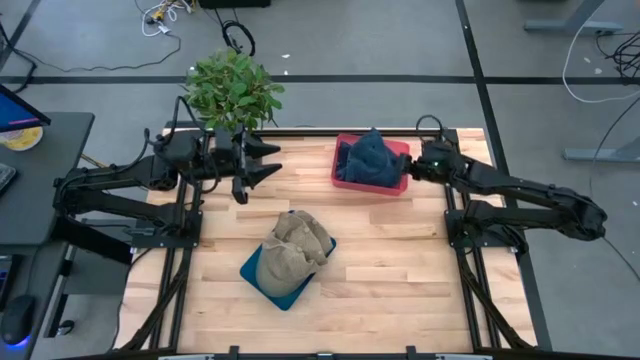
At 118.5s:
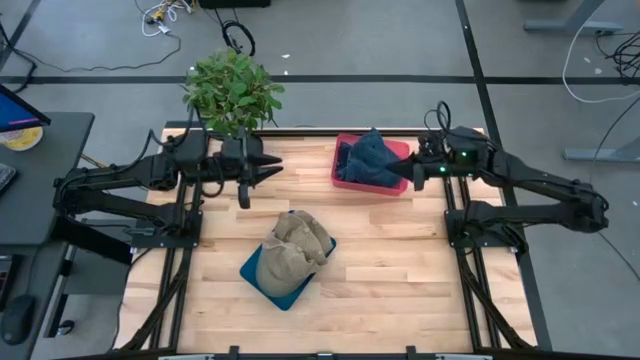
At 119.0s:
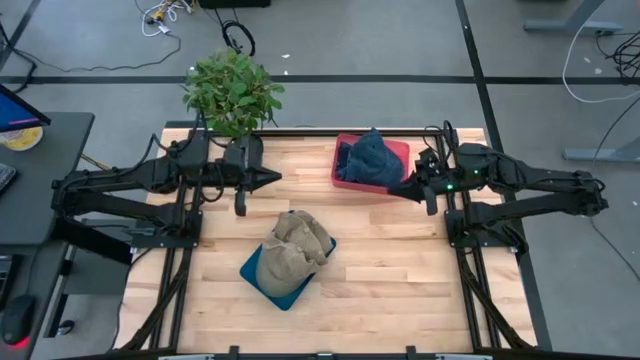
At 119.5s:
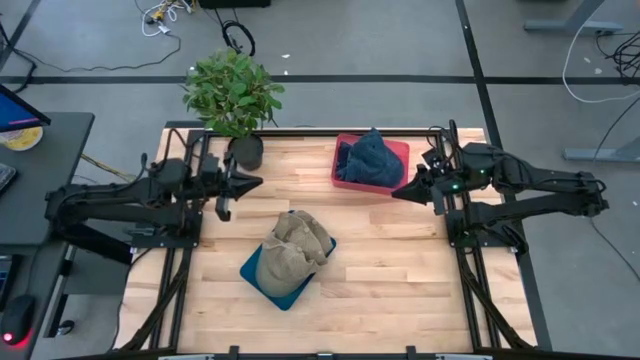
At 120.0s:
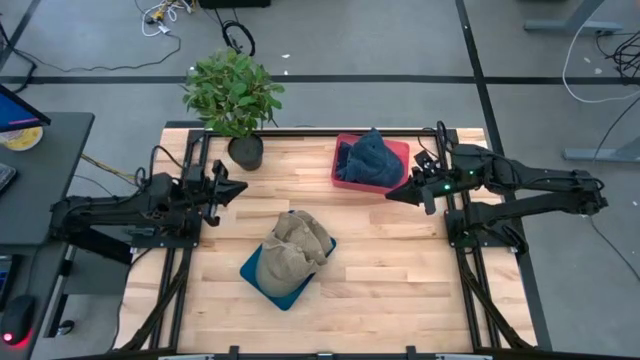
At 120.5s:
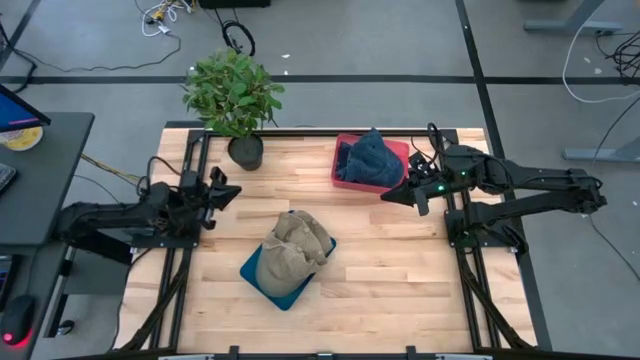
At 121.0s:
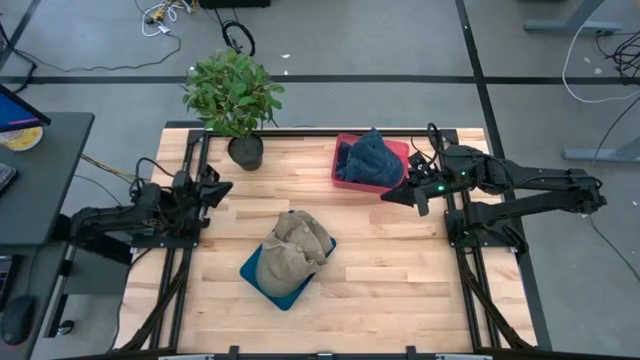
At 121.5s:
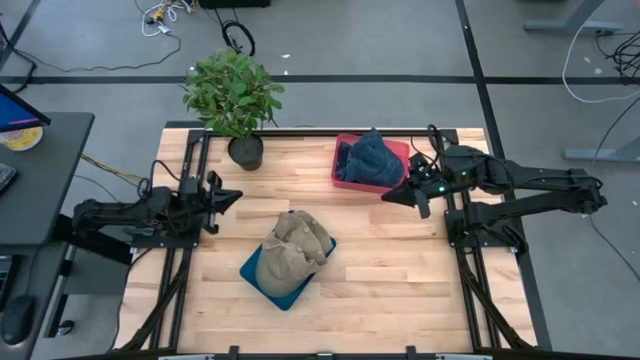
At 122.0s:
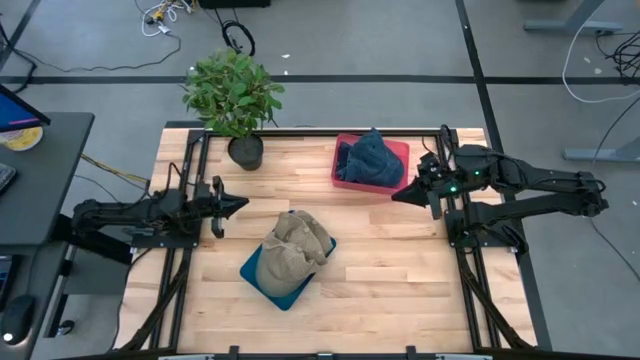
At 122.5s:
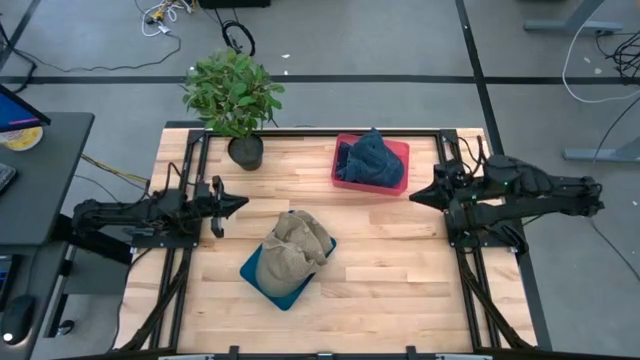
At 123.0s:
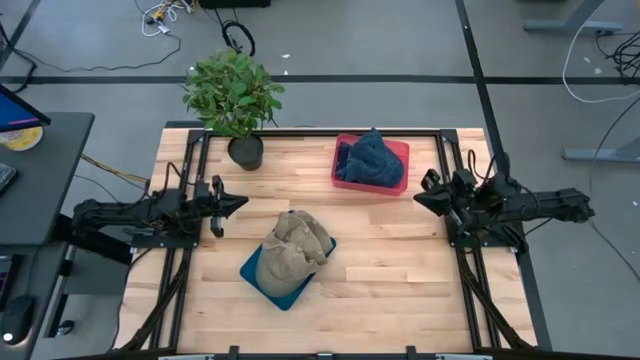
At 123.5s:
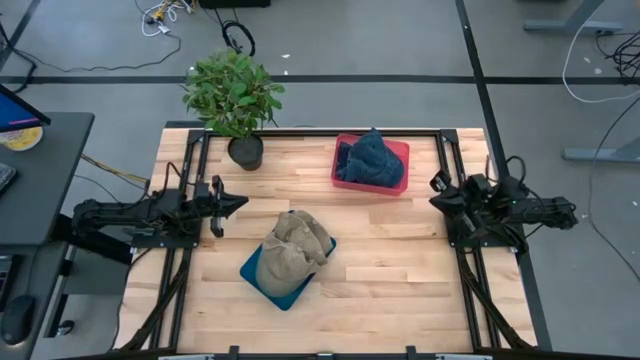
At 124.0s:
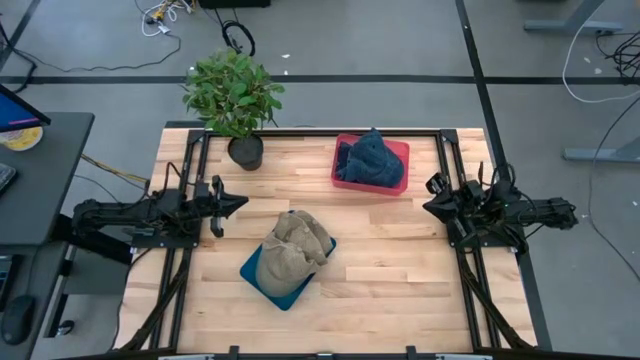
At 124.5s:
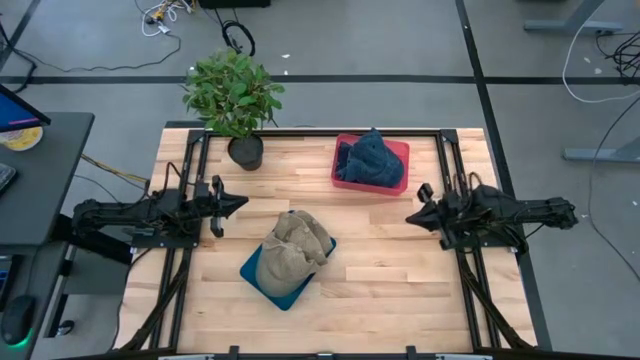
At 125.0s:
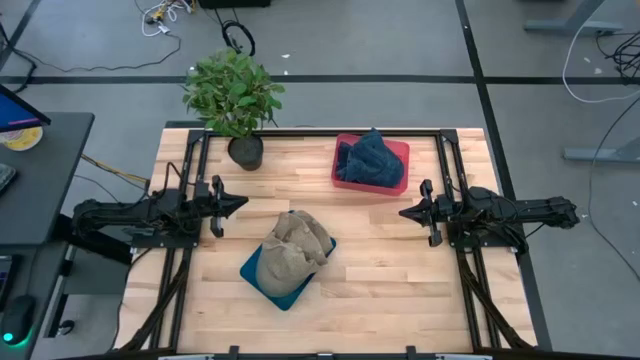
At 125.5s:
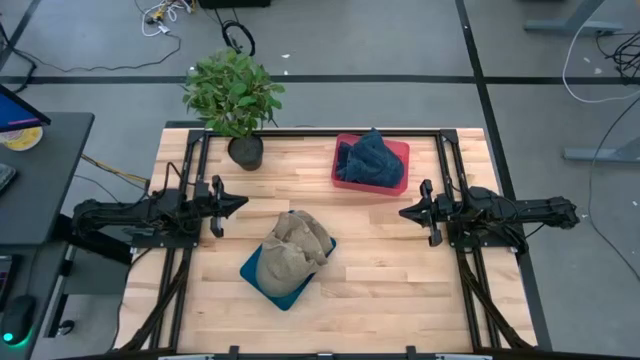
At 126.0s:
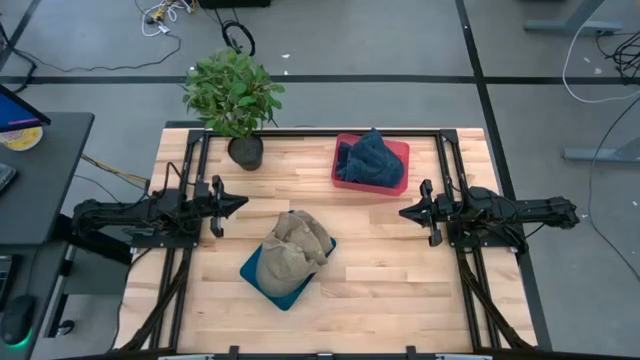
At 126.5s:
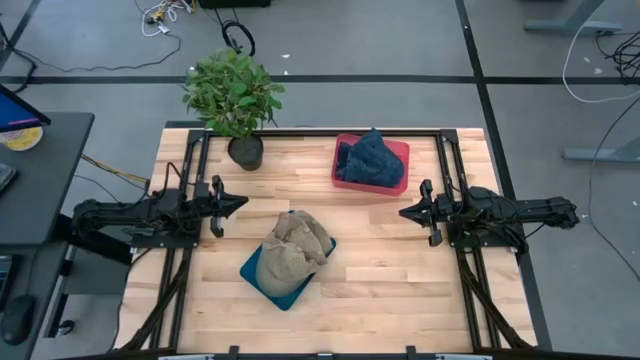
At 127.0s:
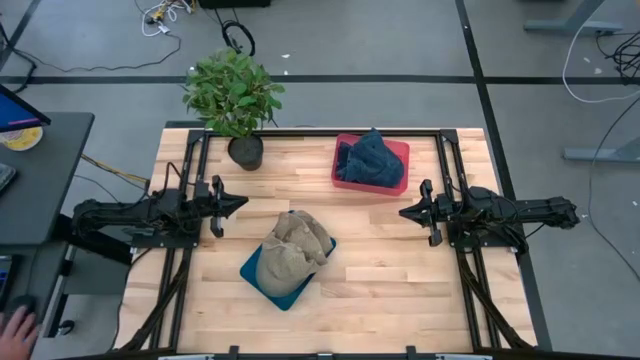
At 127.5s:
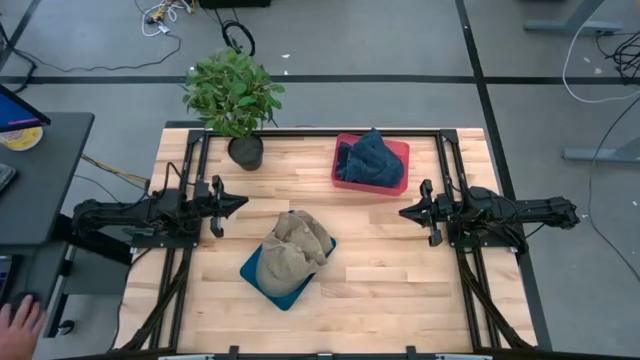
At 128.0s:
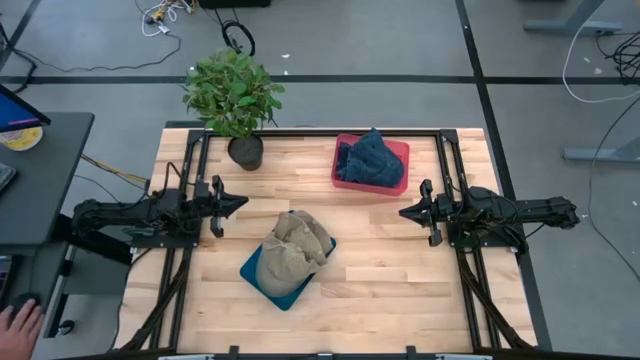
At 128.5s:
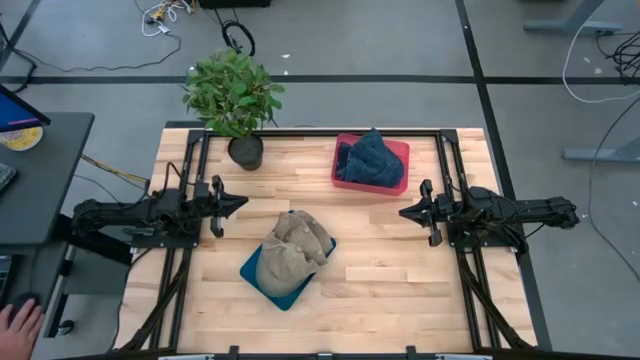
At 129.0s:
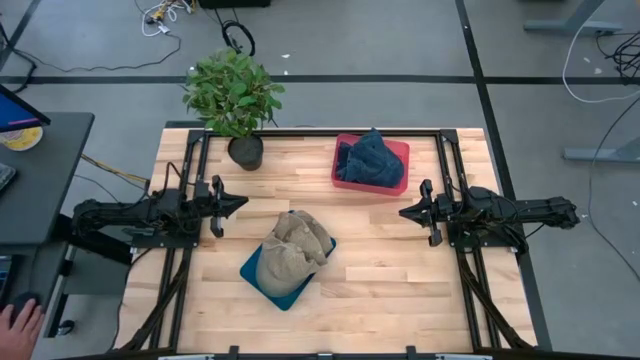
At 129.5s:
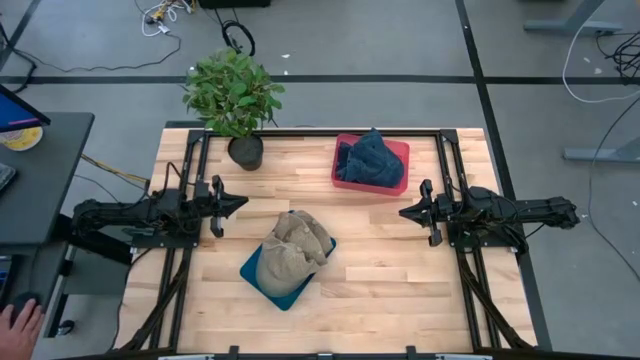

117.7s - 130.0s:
Task: Pick & Place hat
Return to home position

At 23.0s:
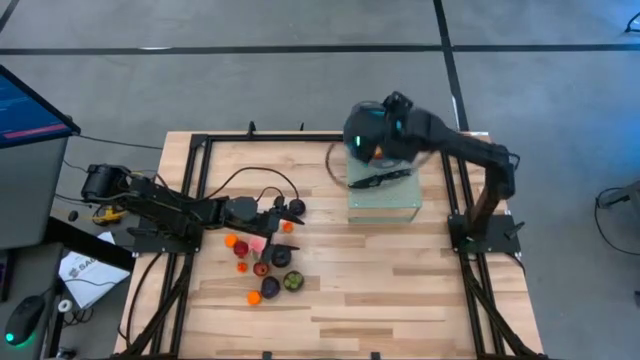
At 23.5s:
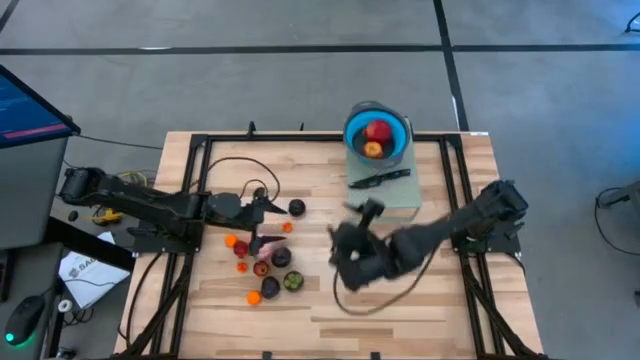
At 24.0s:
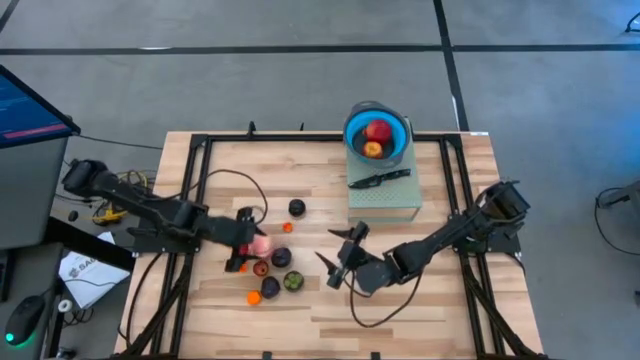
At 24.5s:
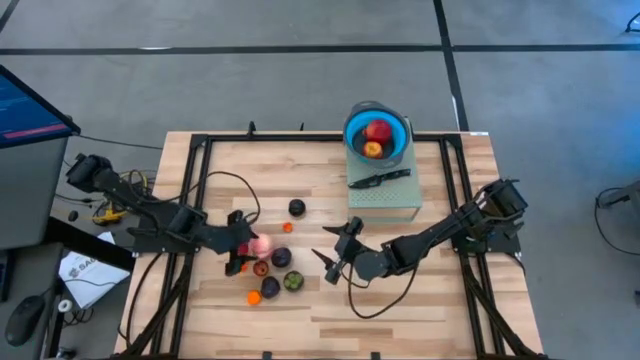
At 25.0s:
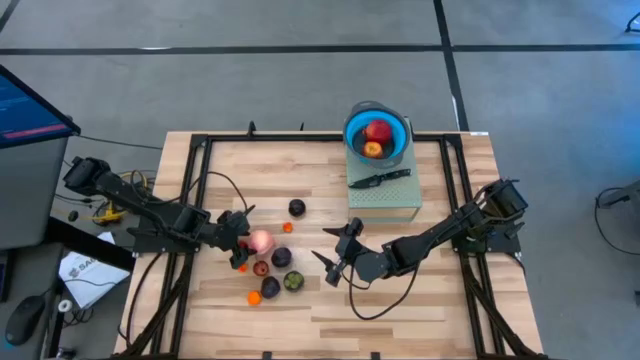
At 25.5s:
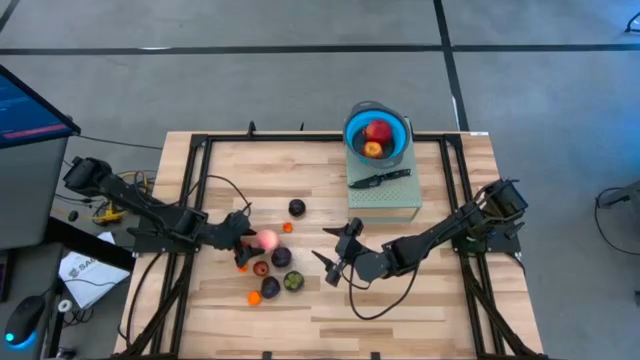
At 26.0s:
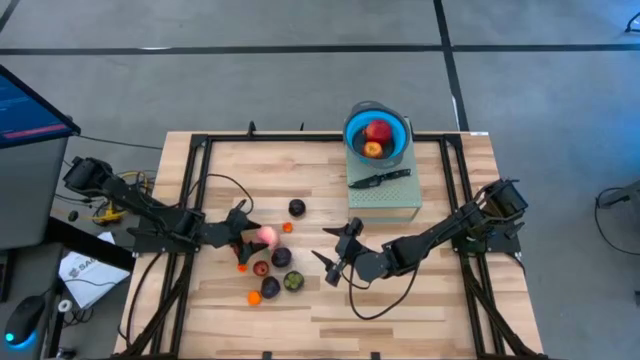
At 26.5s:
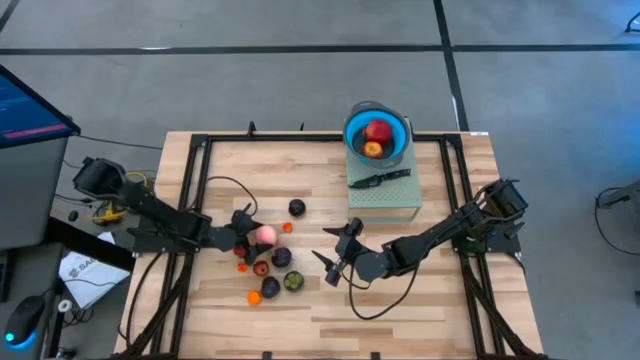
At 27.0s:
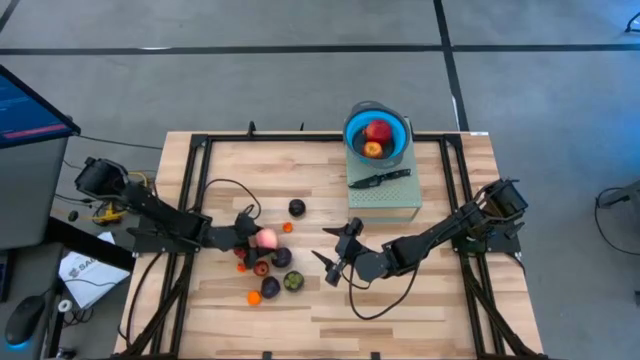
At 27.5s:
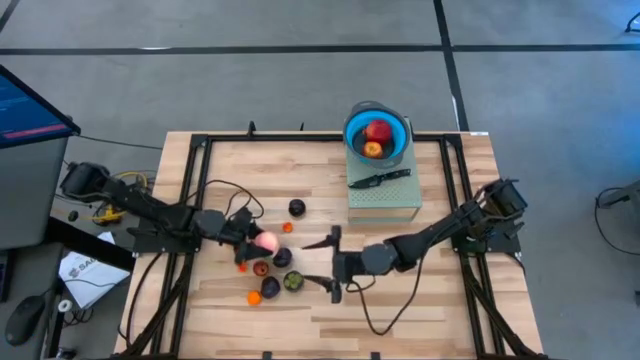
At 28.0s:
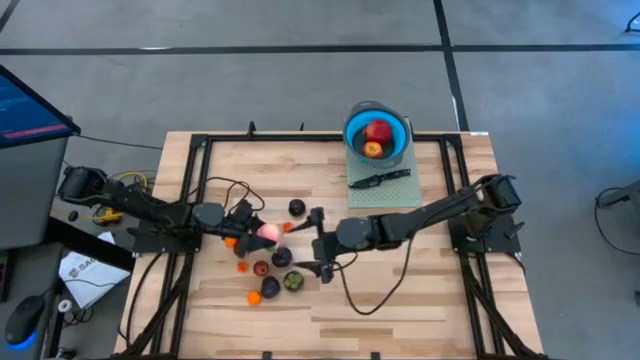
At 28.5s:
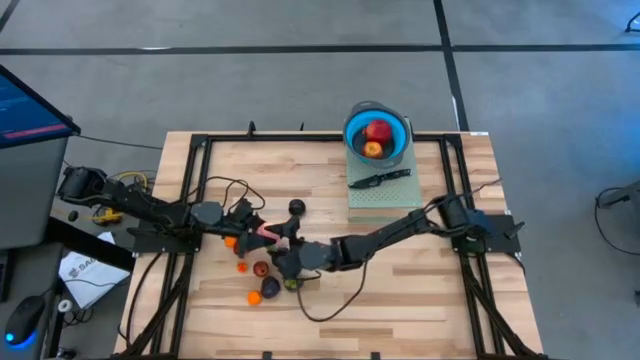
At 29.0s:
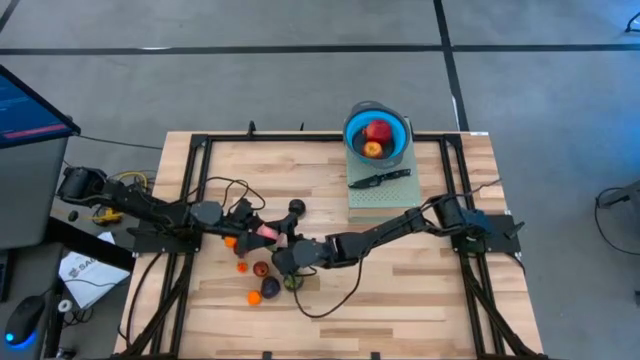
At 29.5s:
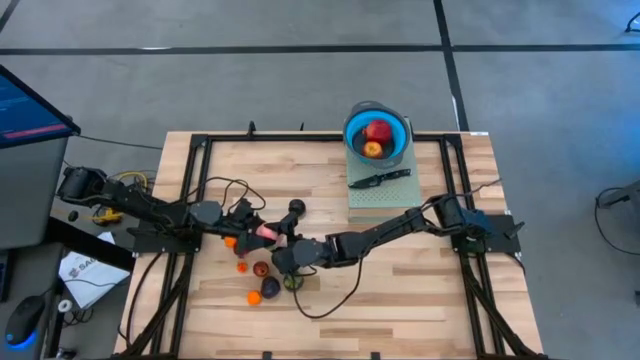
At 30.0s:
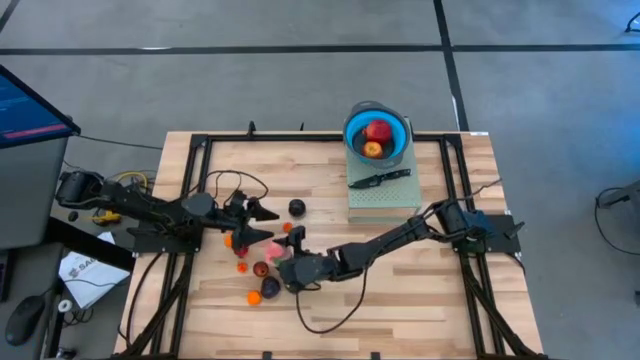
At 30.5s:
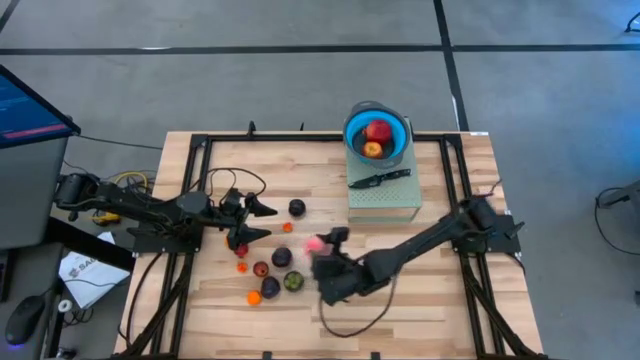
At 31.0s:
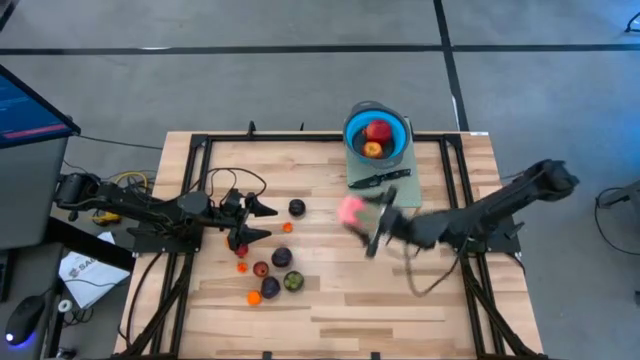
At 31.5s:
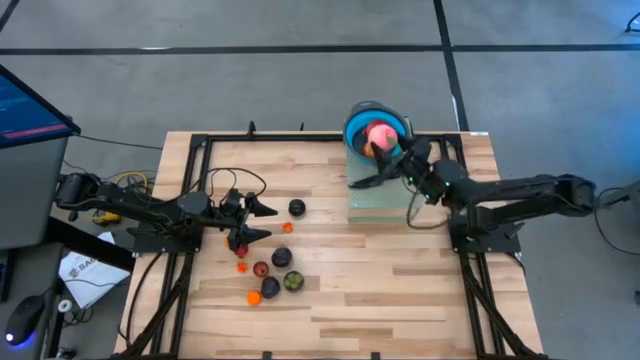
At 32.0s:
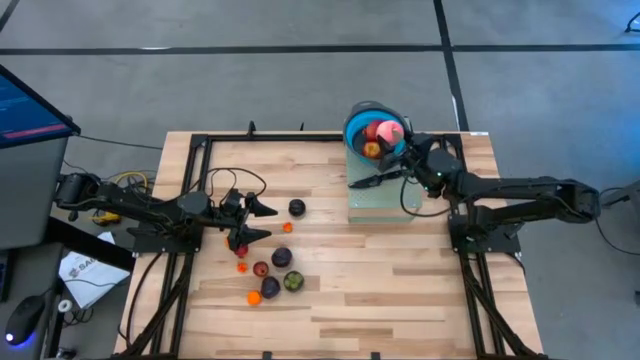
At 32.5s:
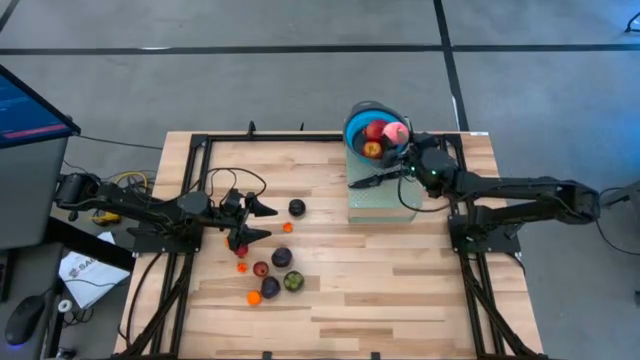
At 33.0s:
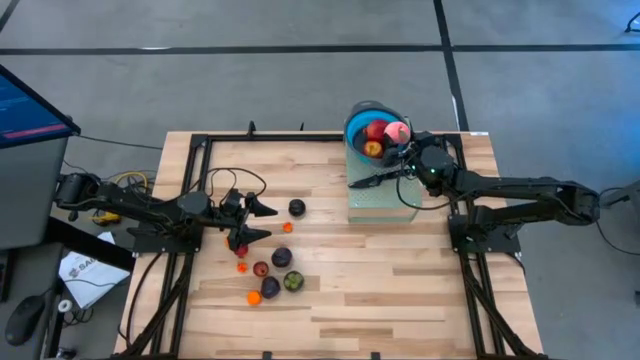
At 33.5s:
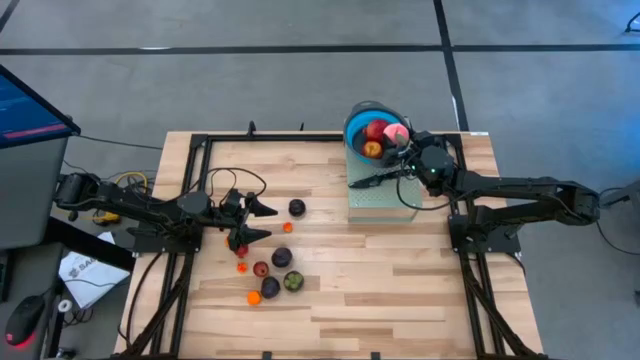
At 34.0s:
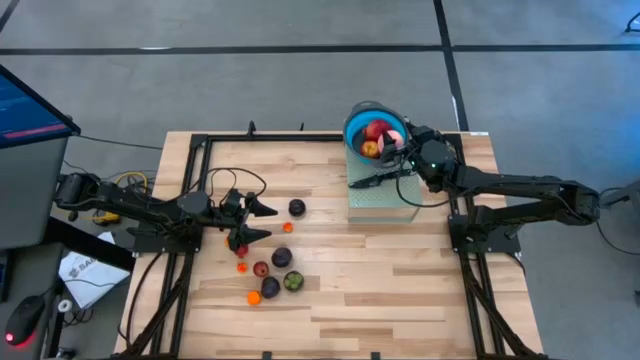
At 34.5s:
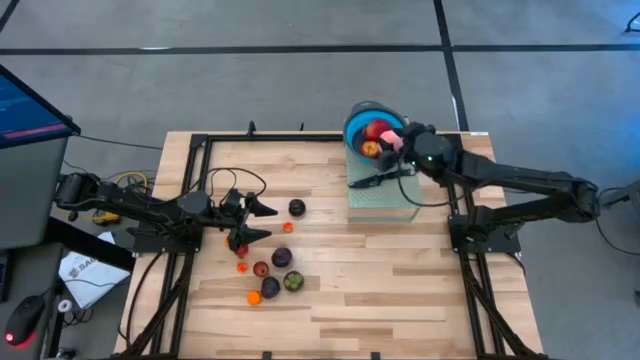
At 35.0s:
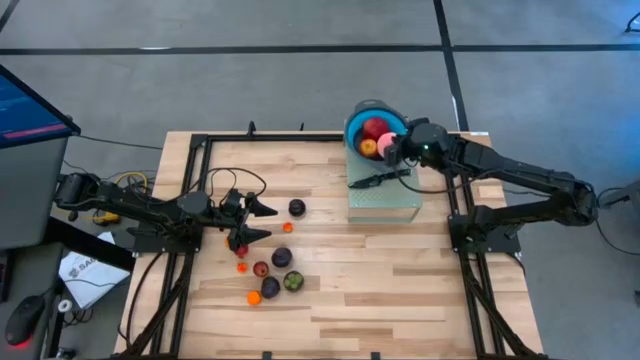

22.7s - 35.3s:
Task: Pick & Place Fruit
Put the pink peach into the blue strainer bowl on the shelf
